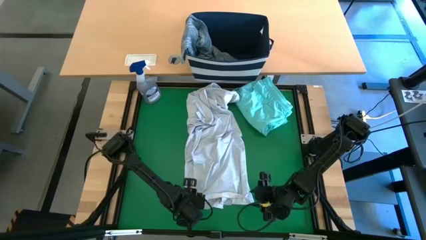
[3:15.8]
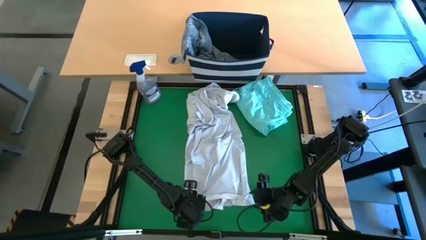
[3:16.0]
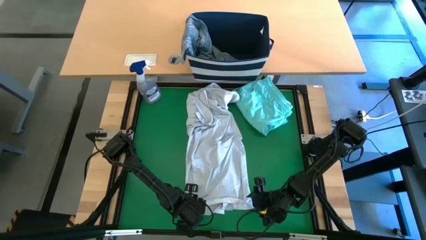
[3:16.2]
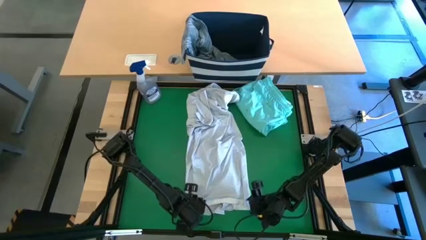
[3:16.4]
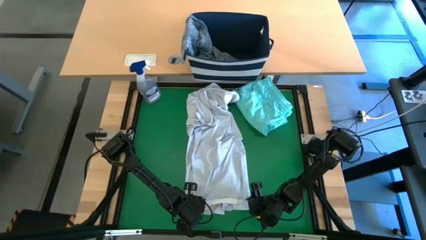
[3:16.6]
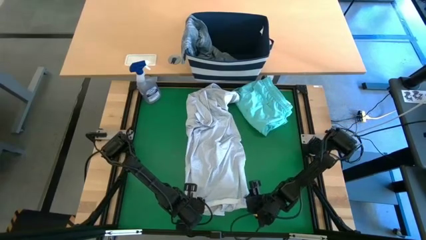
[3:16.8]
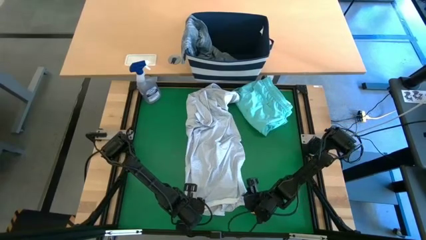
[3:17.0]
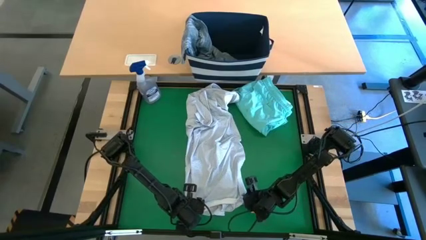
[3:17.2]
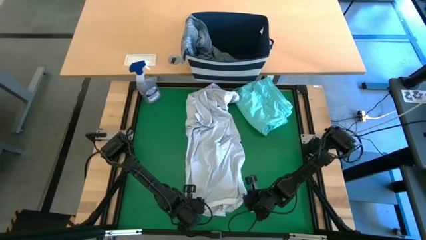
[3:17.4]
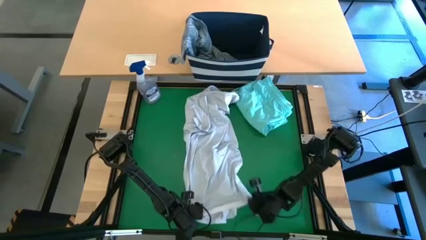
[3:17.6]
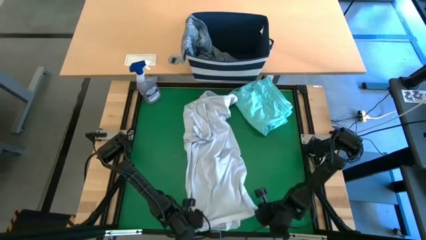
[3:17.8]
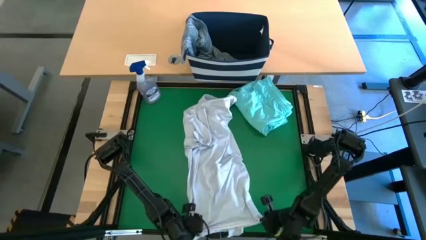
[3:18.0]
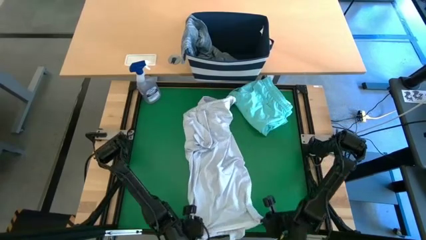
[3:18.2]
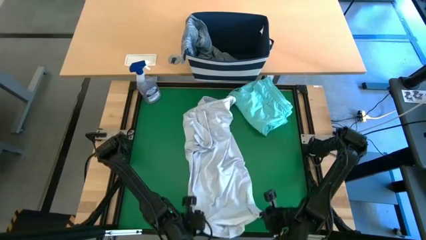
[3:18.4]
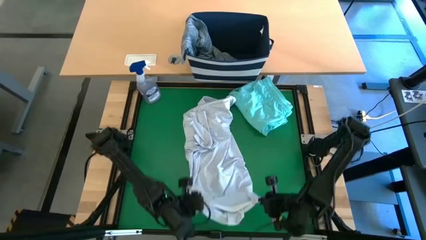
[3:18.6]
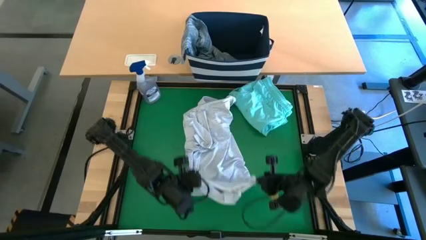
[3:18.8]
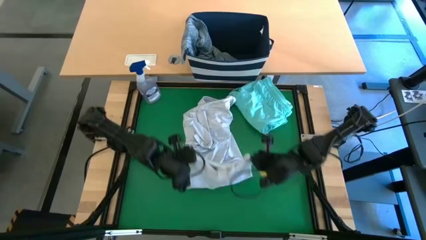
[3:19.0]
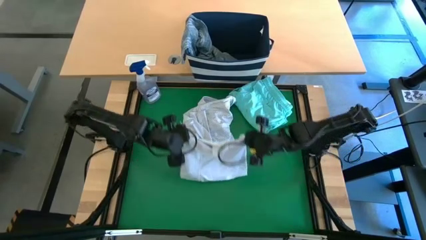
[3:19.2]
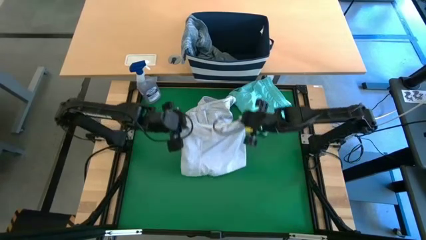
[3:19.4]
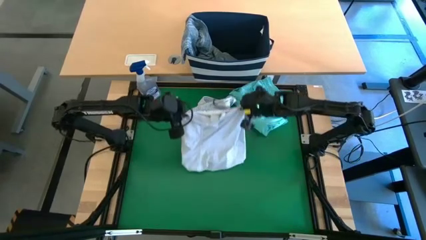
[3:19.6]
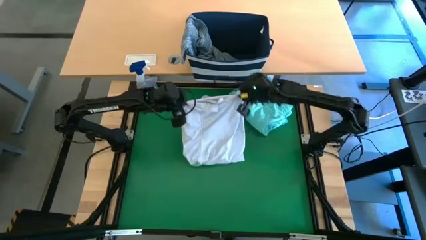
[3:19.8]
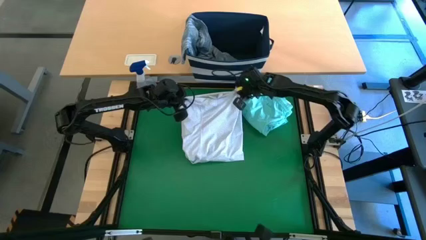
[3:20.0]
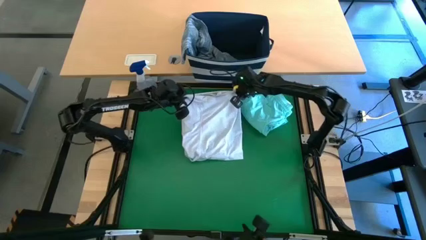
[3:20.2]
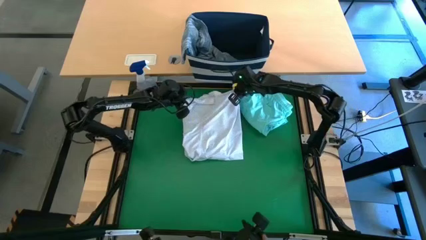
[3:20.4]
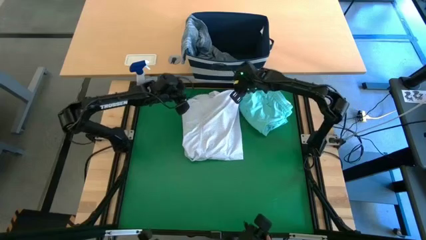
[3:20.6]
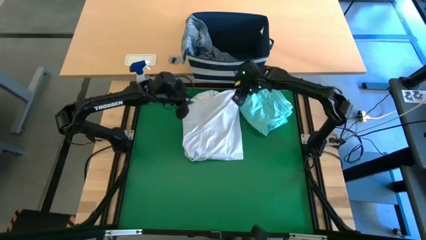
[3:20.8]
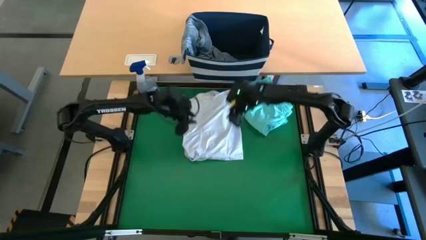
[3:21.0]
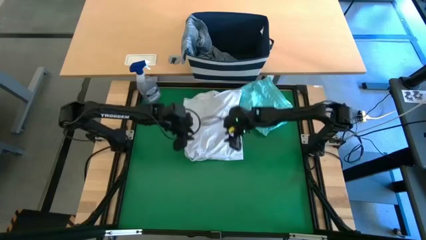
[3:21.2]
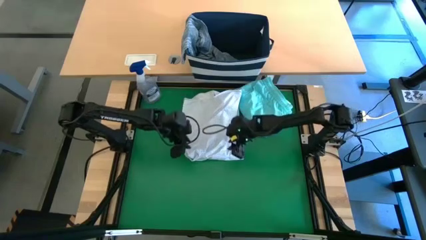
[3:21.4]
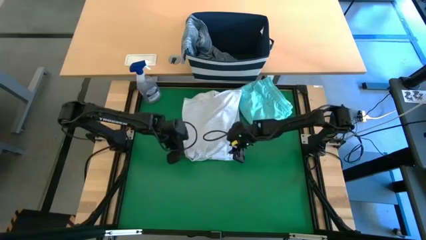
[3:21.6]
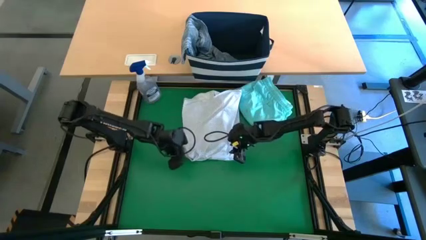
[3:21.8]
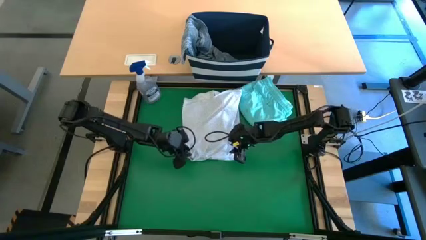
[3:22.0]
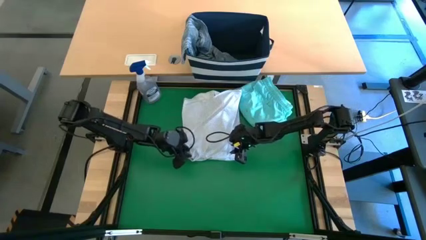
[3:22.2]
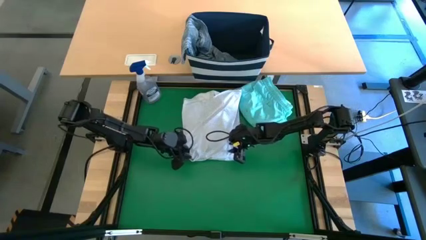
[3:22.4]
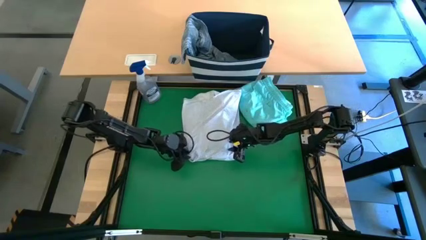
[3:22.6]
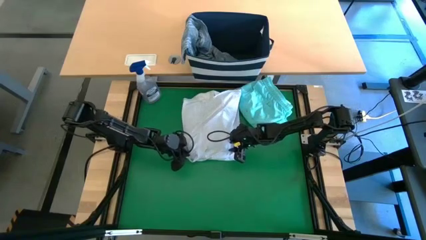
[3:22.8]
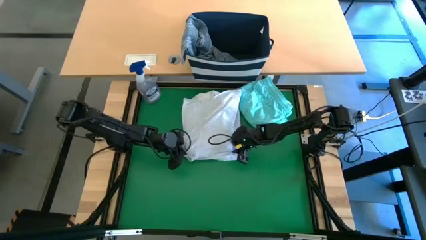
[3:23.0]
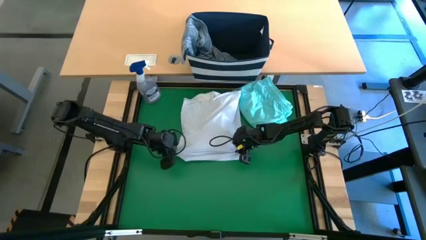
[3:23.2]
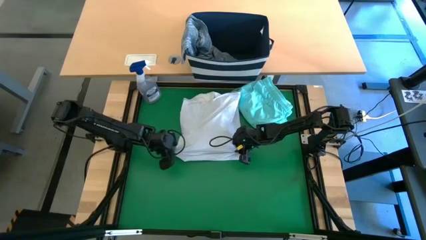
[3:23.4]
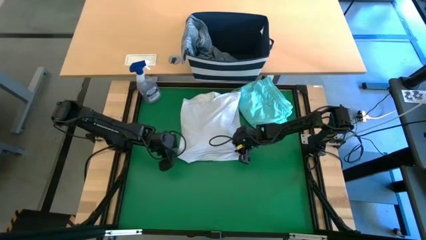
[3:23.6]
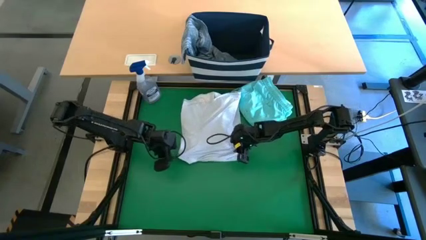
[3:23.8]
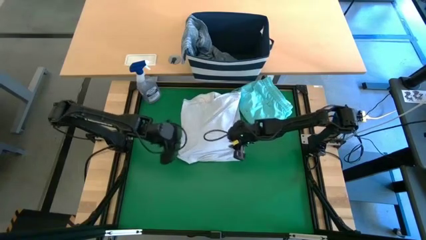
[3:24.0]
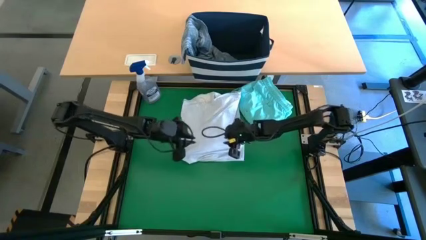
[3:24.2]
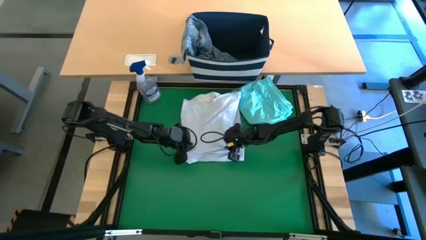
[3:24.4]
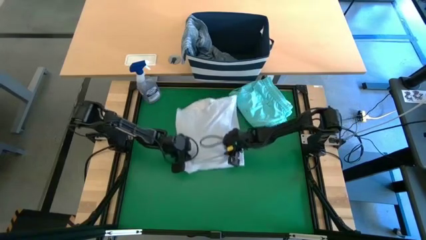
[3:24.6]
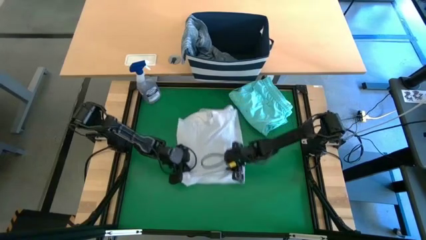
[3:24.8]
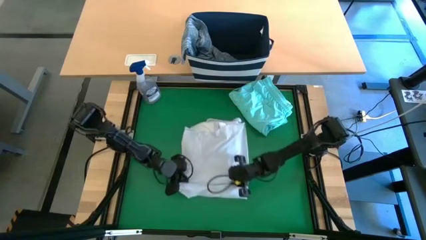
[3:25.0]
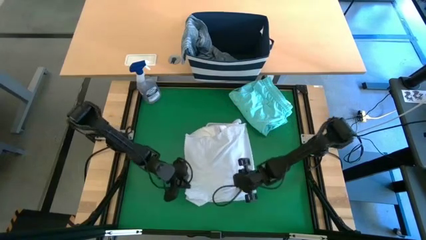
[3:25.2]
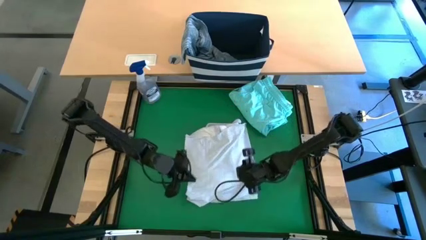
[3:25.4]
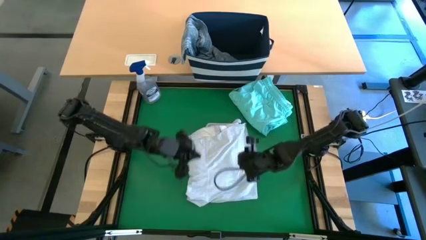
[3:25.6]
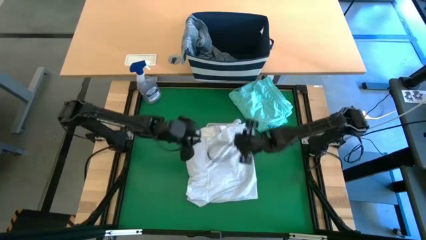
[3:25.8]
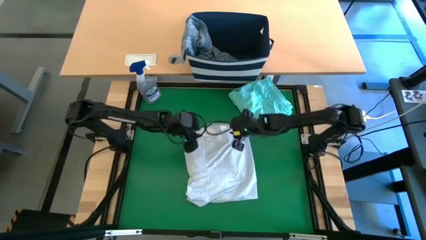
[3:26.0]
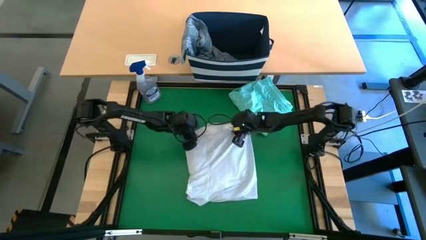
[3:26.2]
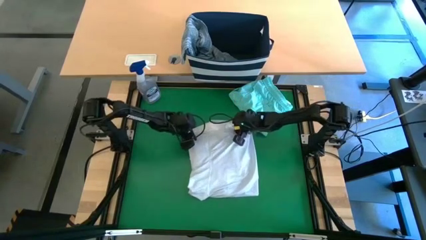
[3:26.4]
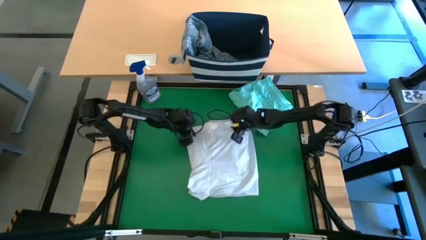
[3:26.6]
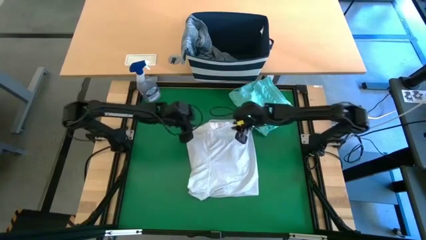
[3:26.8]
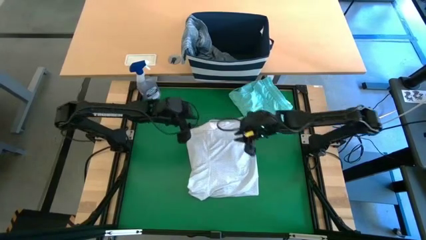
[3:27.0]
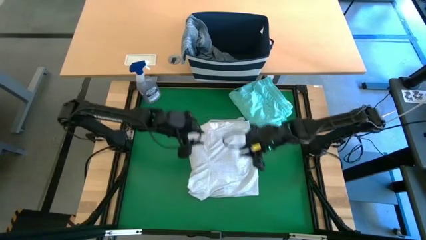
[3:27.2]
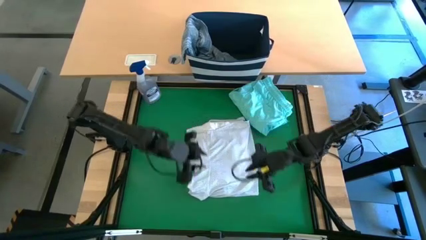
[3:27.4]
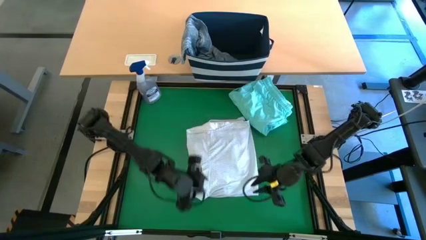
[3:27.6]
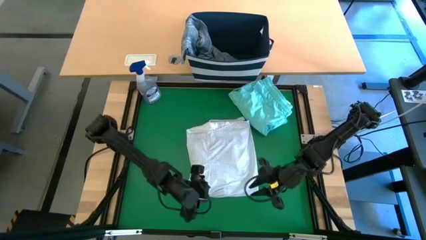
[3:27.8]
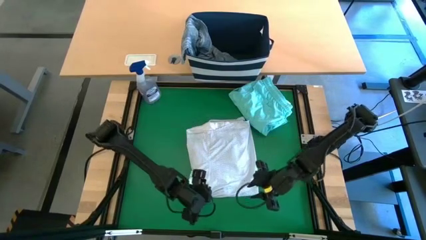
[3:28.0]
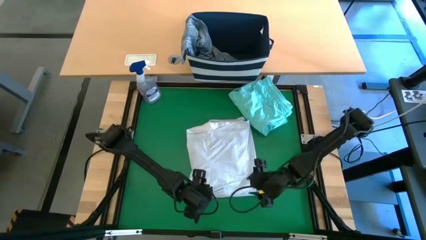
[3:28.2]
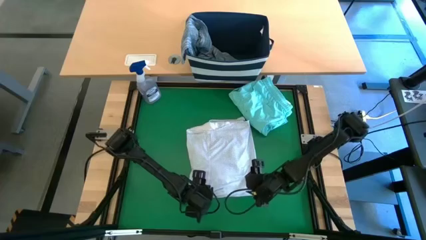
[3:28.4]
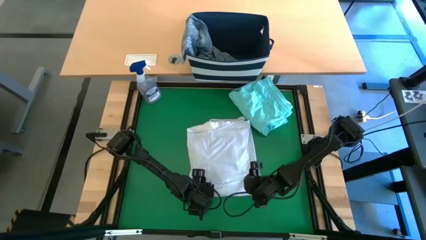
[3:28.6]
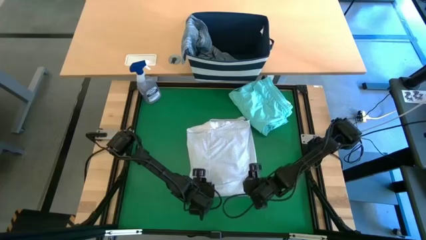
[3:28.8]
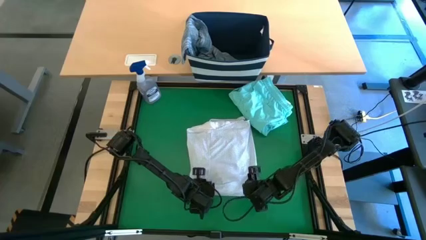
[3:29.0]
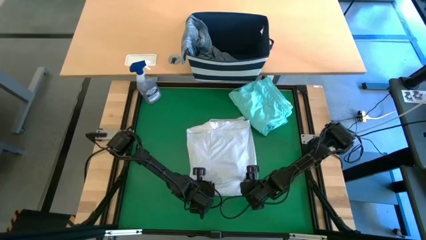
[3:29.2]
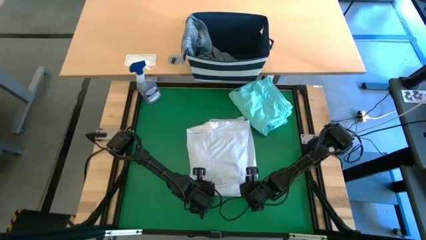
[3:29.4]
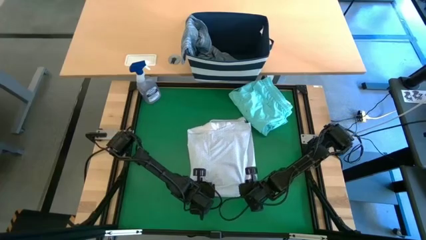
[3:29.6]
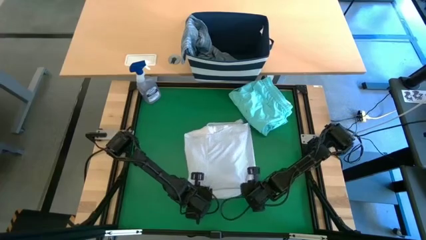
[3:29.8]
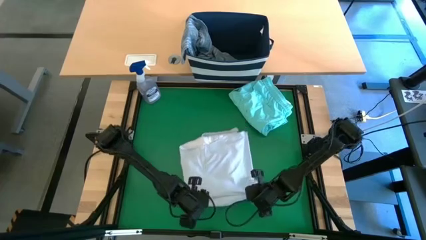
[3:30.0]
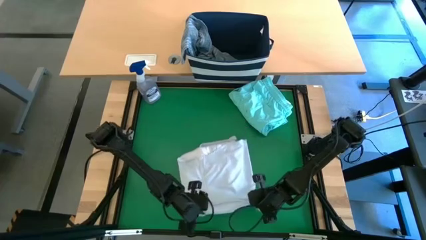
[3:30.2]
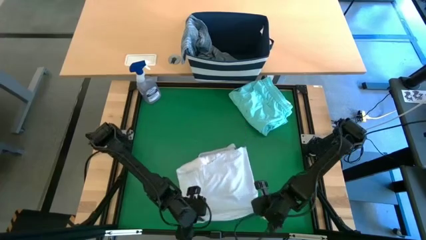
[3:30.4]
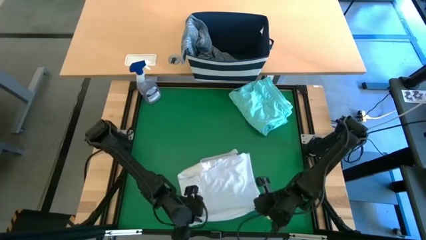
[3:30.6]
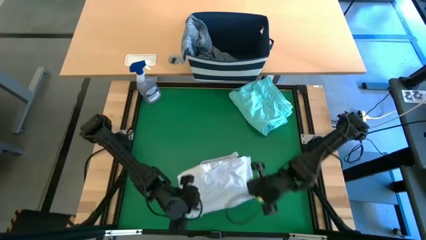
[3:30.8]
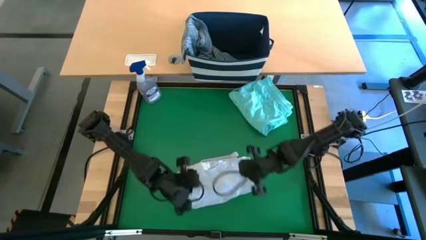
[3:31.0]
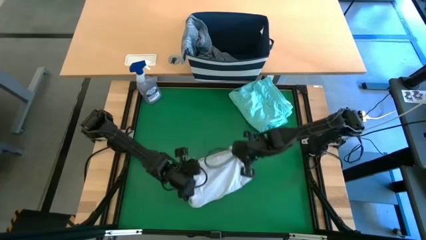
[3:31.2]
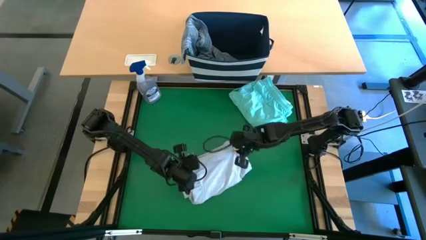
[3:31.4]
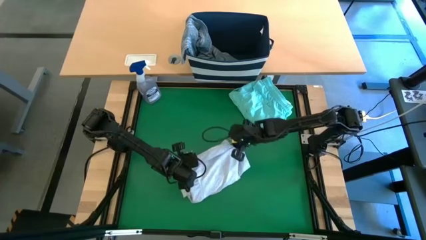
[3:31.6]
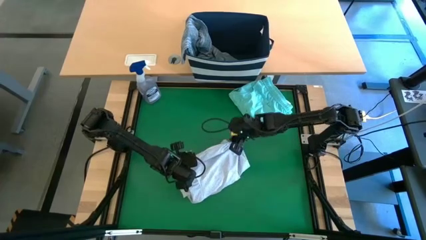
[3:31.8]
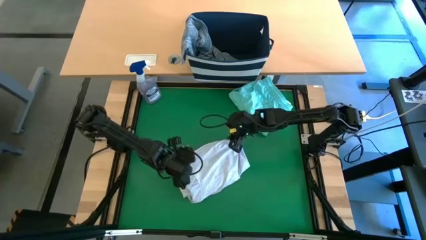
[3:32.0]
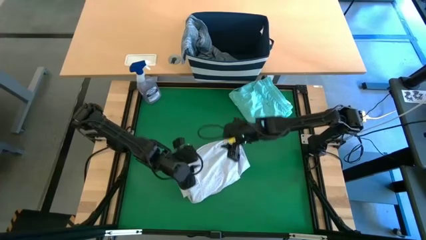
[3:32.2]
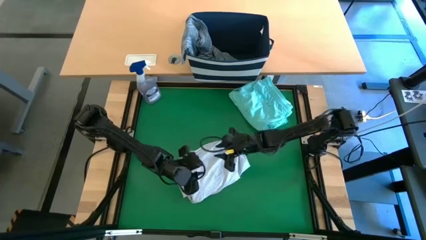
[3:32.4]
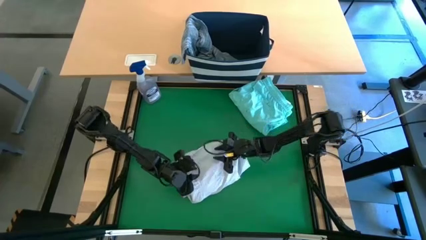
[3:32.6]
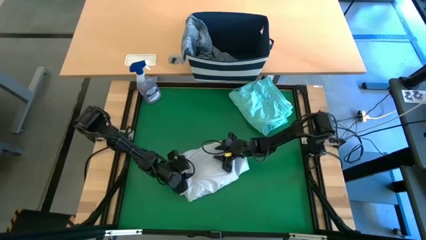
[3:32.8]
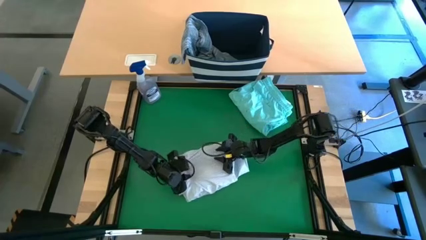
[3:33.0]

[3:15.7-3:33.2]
Task: Fold laundry
Fold the white polo shirt
